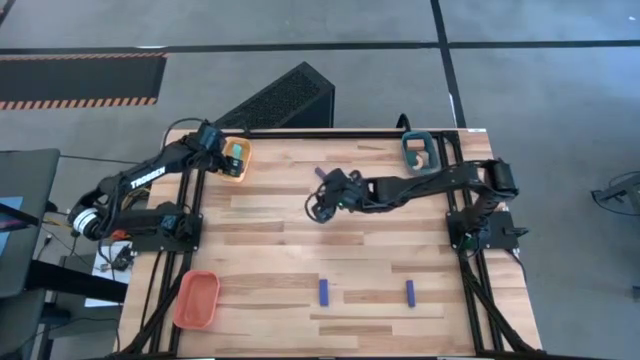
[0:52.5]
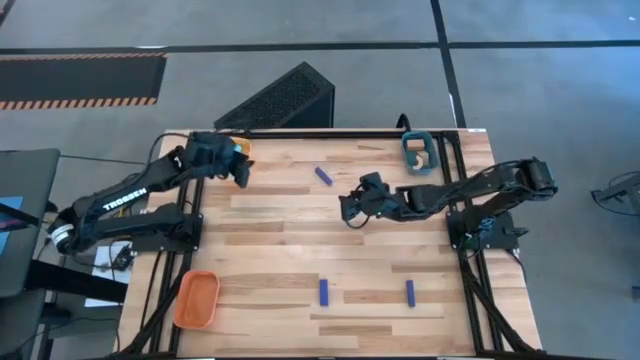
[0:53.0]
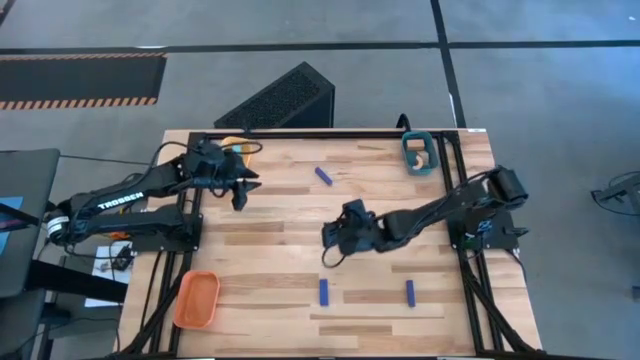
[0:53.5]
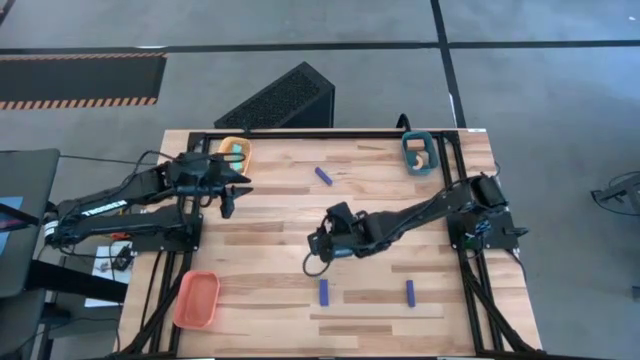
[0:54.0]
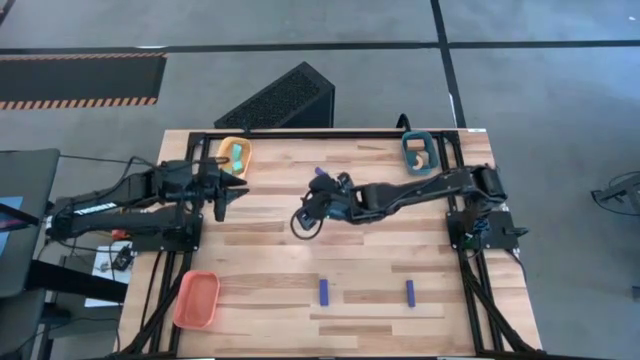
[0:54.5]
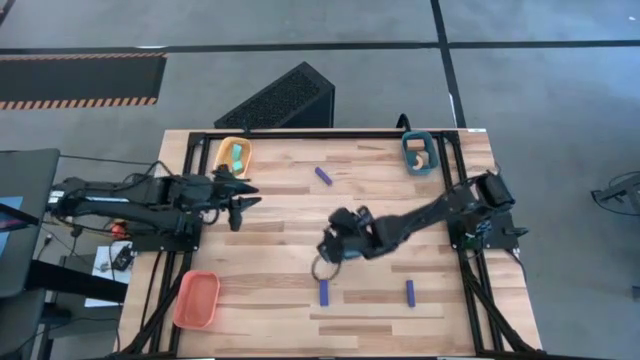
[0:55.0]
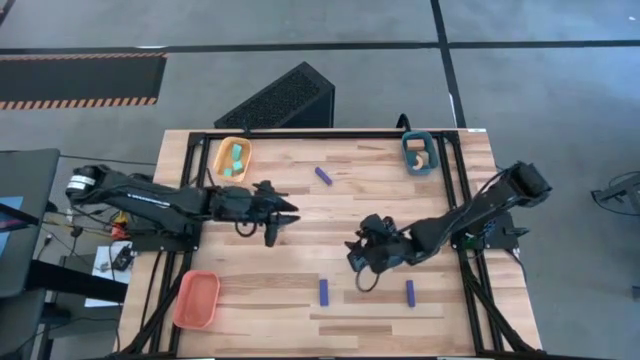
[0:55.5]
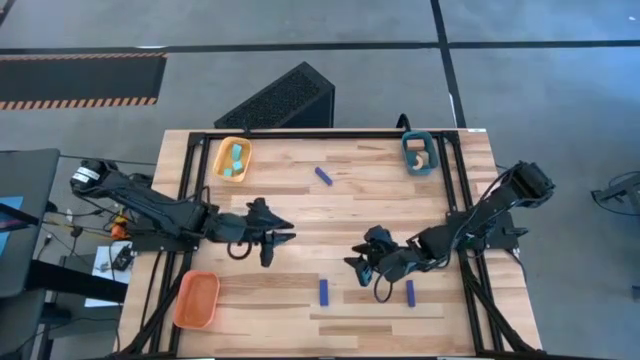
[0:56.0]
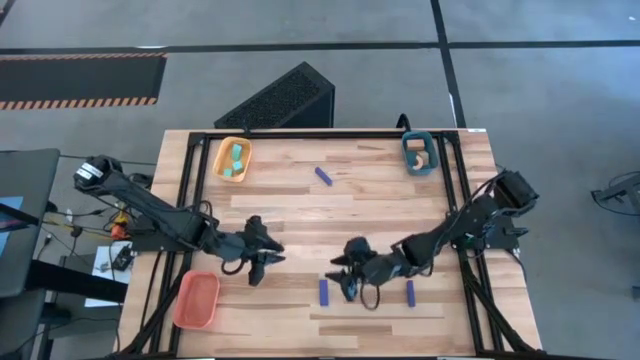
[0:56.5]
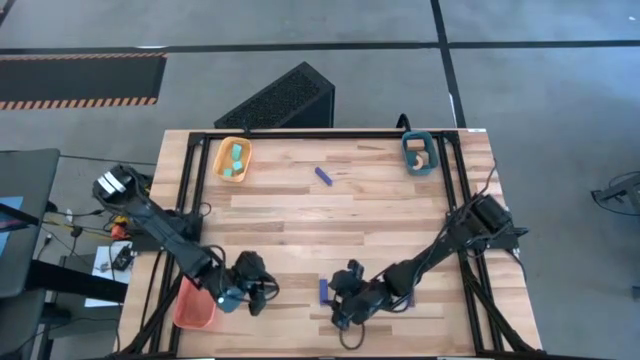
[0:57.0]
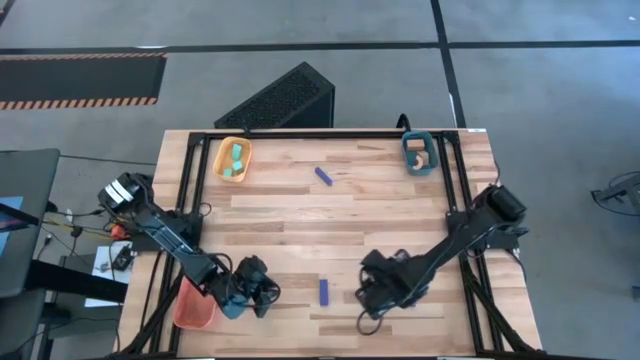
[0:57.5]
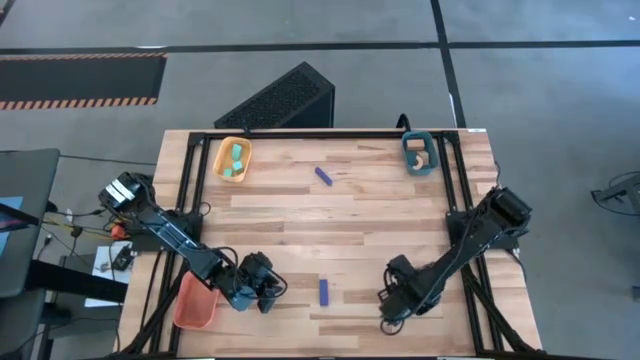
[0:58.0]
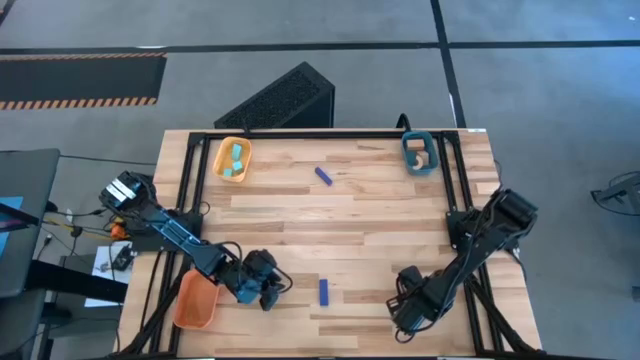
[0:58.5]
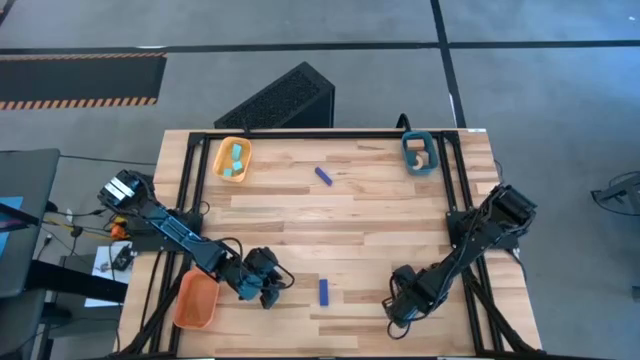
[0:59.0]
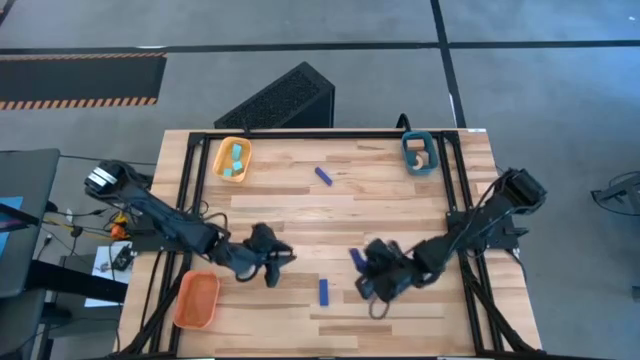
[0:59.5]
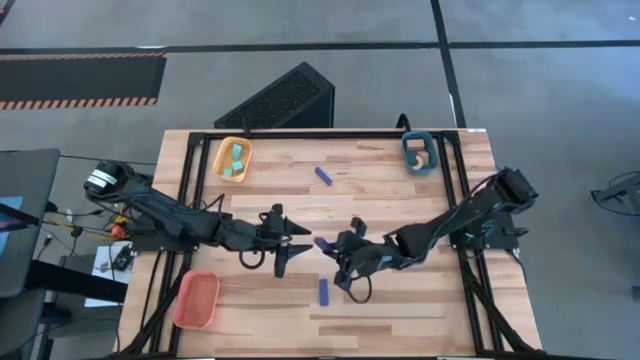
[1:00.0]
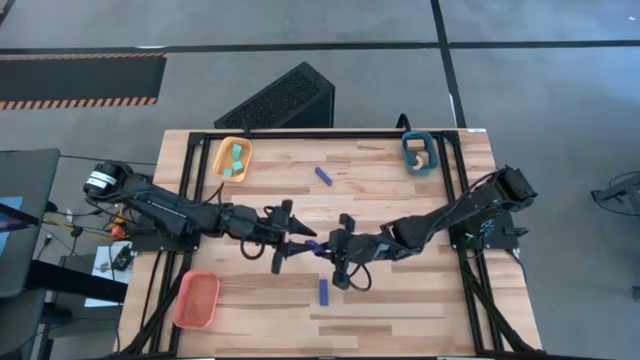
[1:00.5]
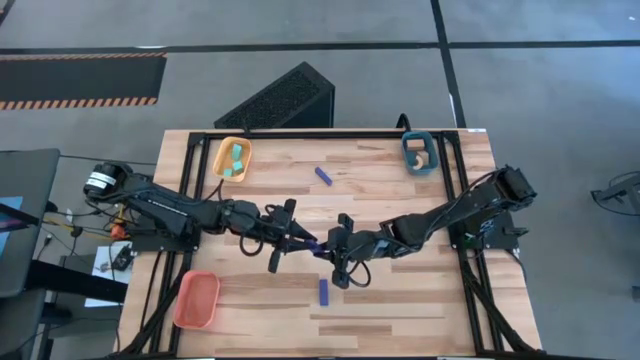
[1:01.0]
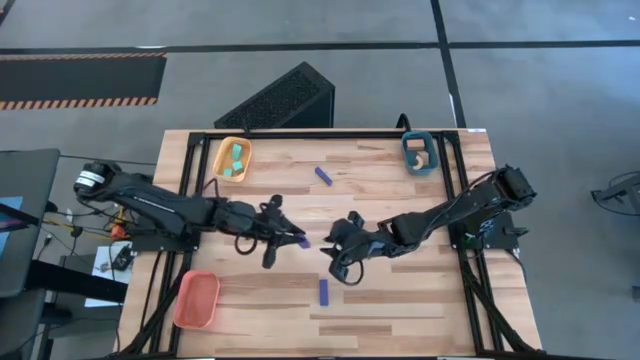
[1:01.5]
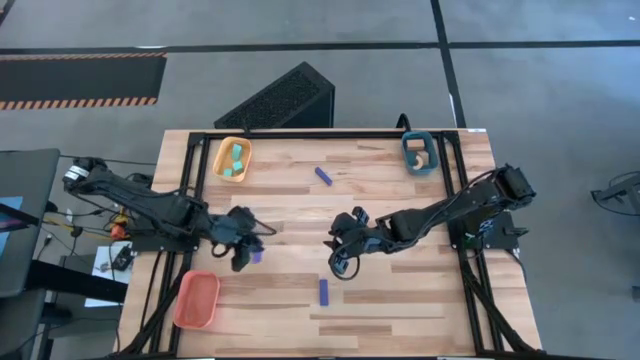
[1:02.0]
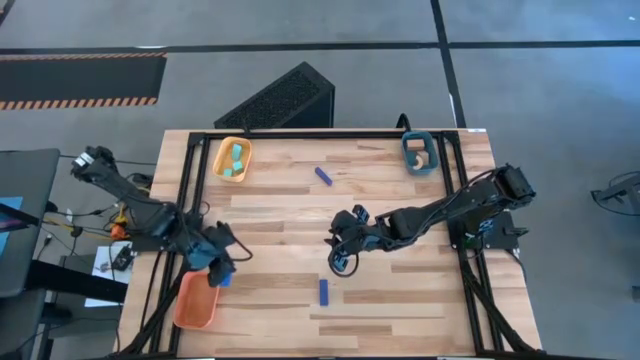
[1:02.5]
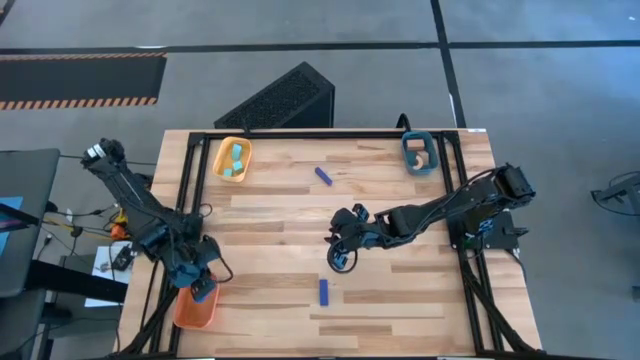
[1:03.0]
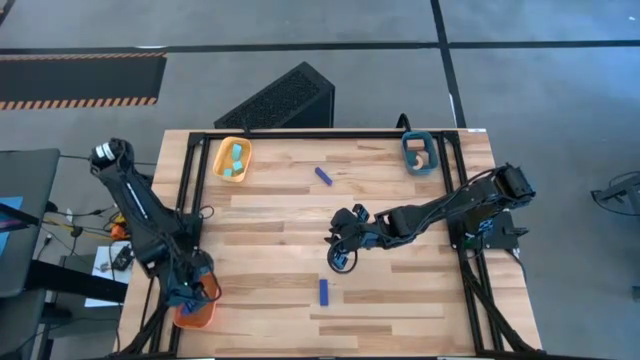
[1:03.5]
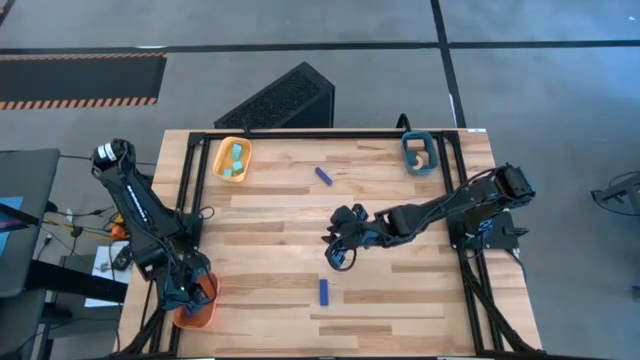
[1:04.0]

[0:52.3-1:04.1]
Task: Sort & place blocks by color
Put the bottom right blue block into the orange bin

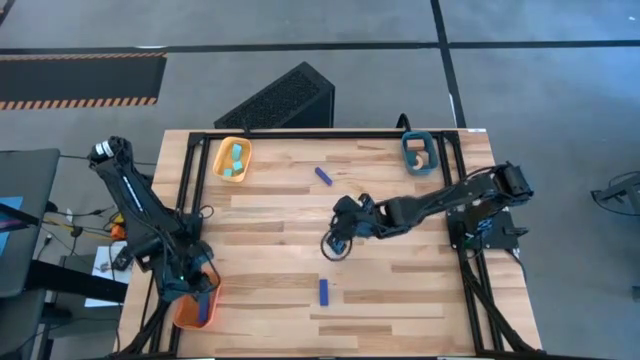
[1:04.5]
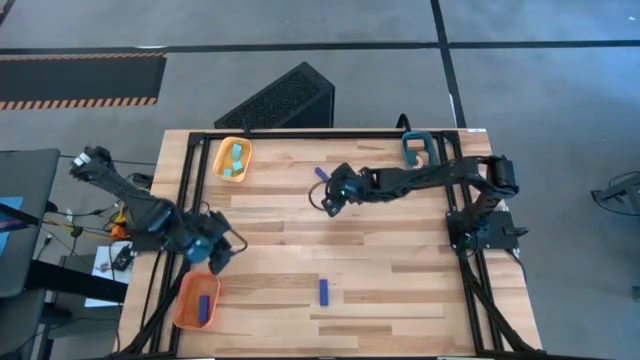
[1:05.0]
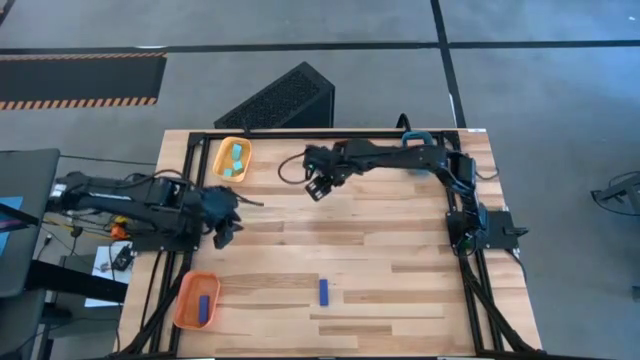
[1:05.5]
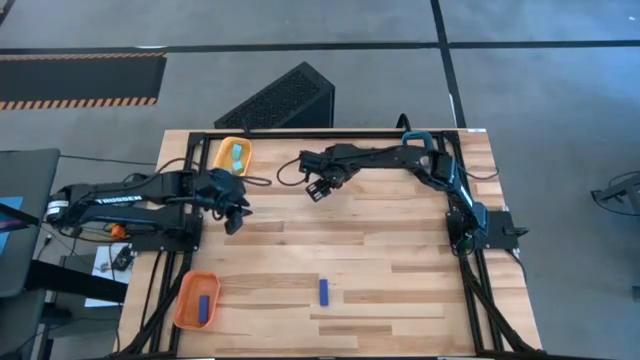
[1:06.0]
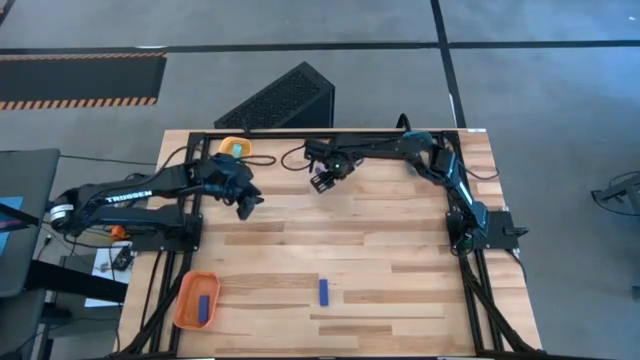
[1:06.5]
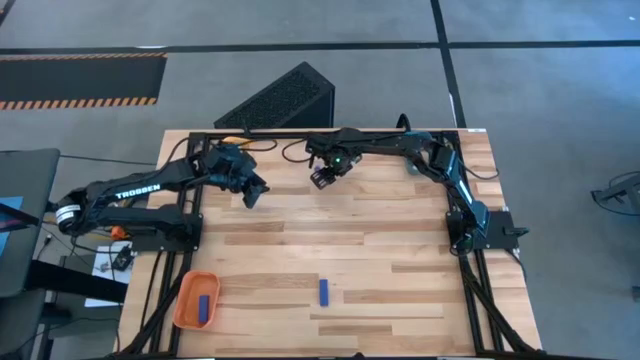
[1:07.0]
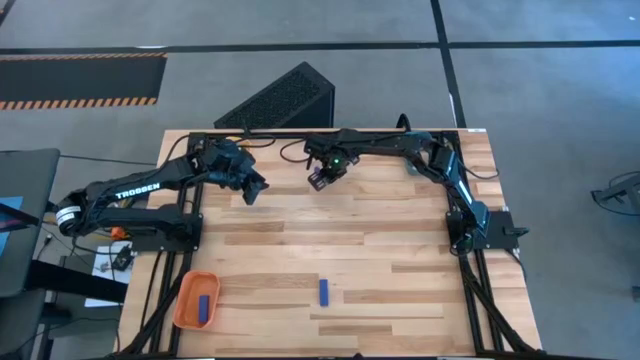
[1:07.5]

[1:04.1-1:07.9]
Put the top blue block into the orange bin

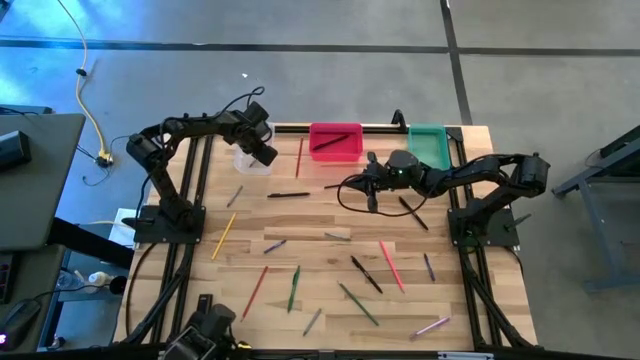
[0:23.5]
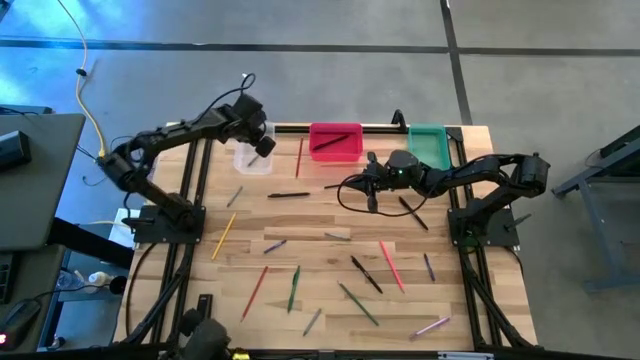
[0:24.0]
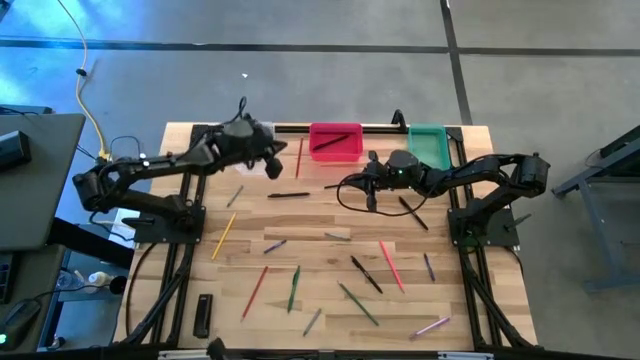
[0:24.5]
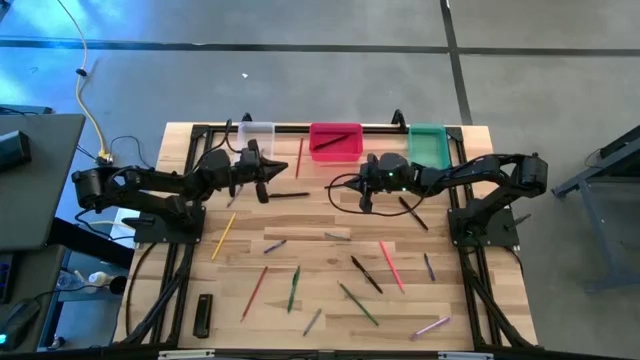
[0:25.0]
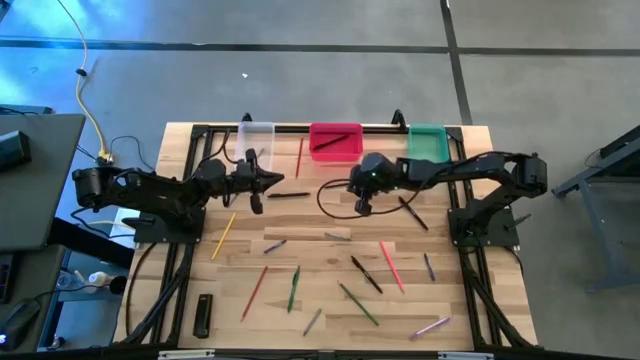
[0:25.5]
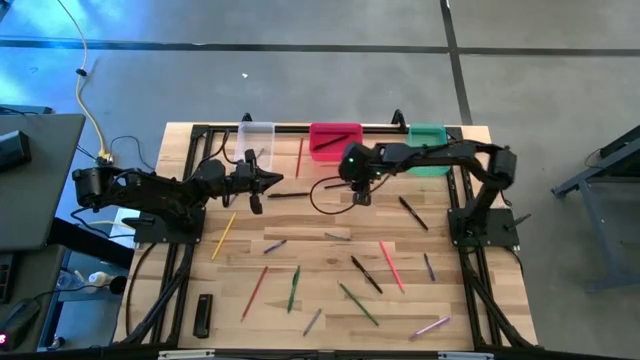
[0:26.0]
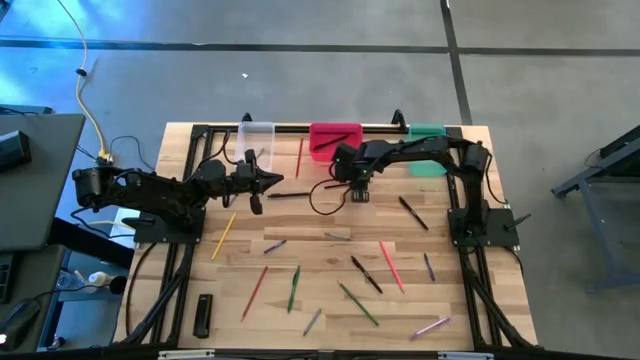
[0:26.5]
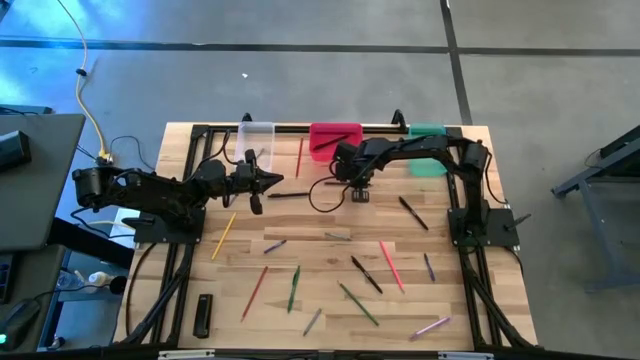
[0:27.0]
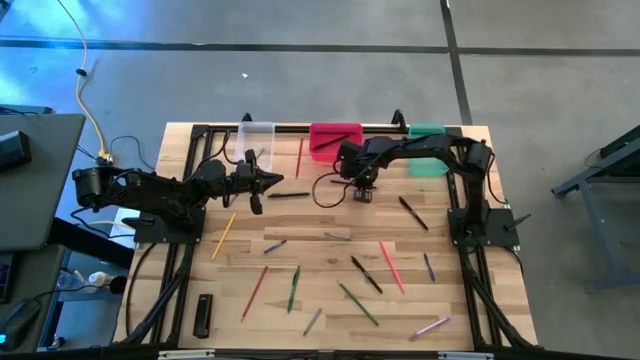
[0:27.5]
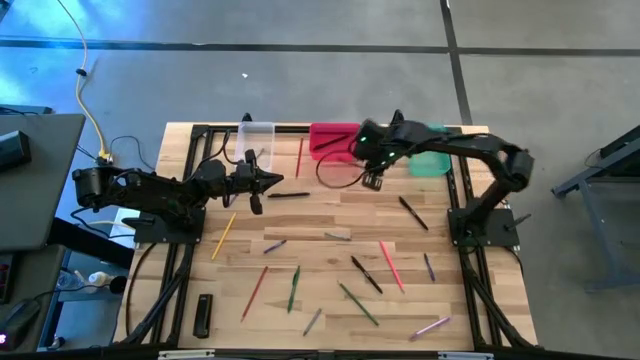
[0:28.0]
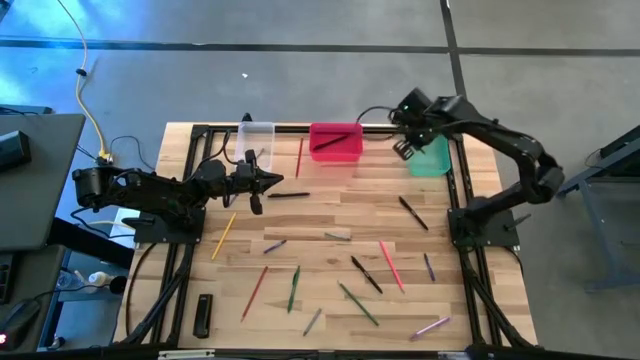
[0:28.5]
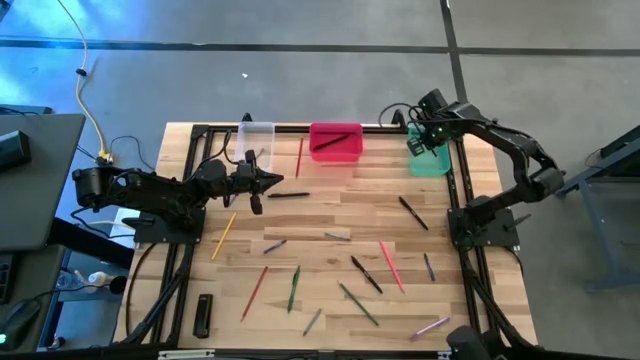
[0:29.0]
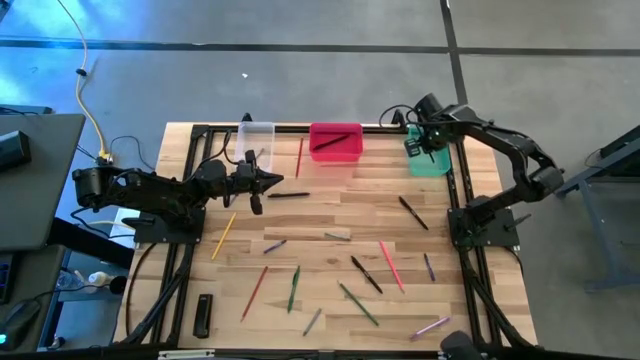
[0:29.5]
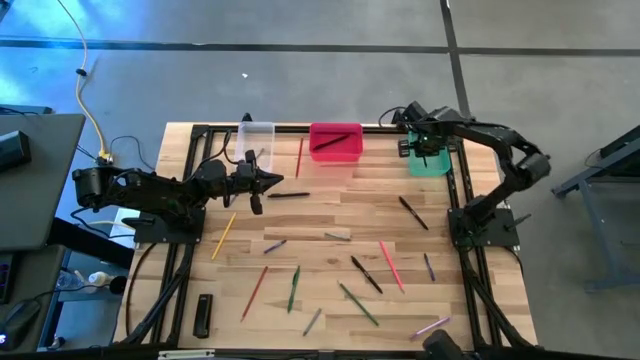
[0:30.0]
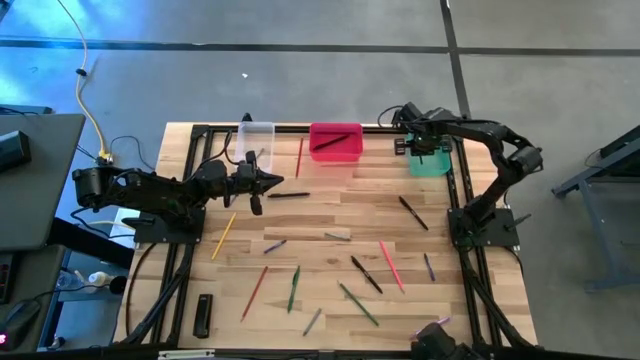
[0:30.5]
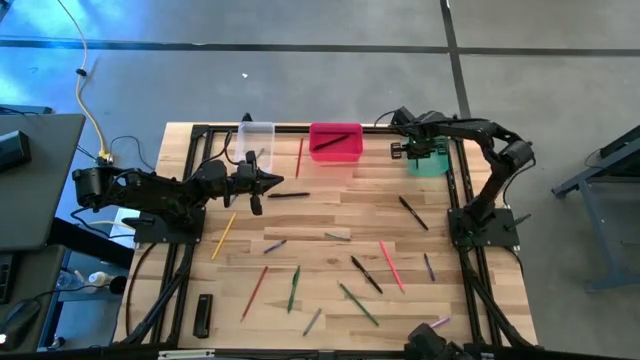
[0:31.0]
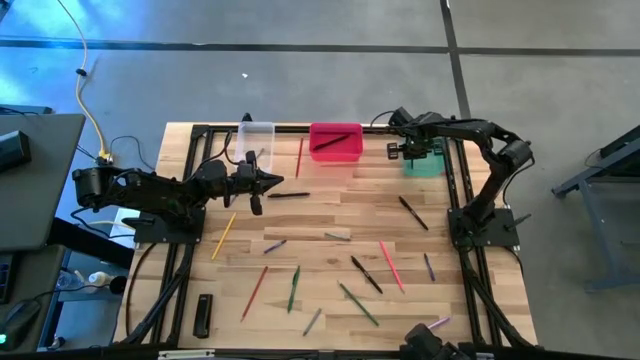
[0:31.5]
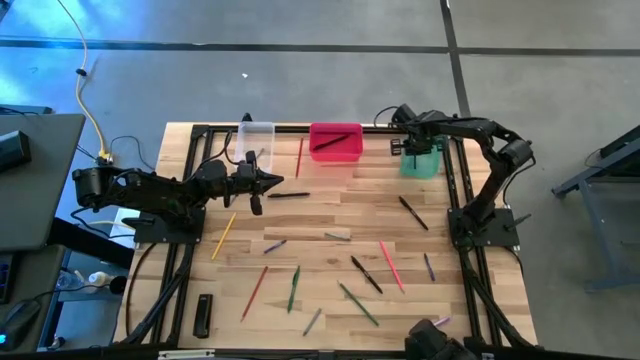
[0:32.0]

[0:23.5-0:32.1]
Task: Sort crayons/erasers/pens/pencils in bins
Put the blue pencil into the blue bin
